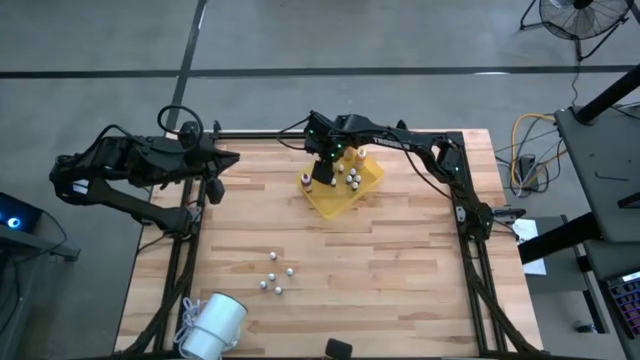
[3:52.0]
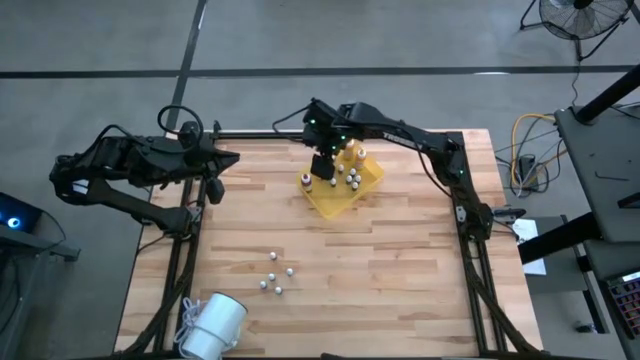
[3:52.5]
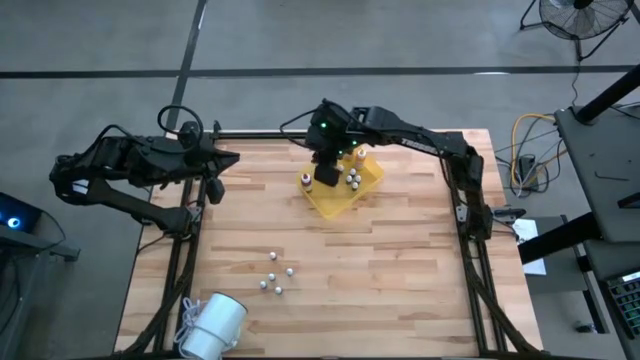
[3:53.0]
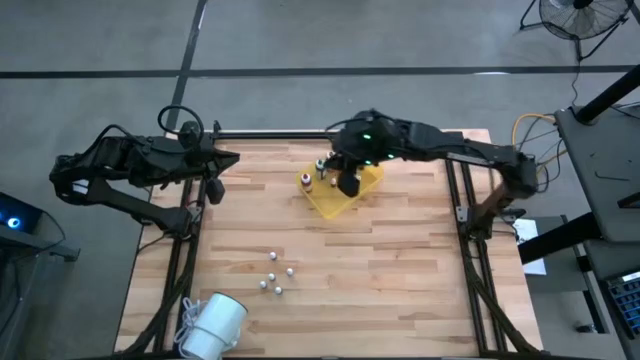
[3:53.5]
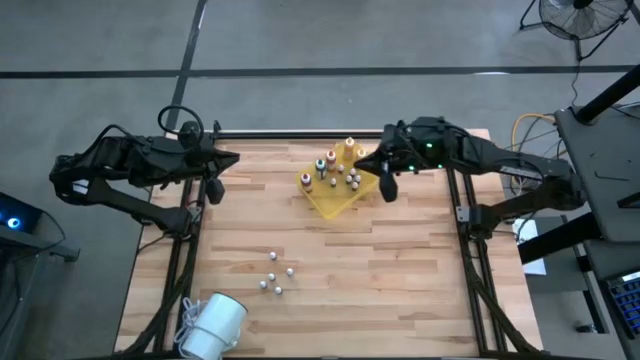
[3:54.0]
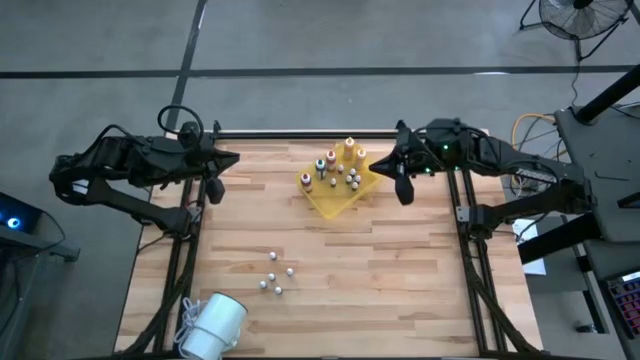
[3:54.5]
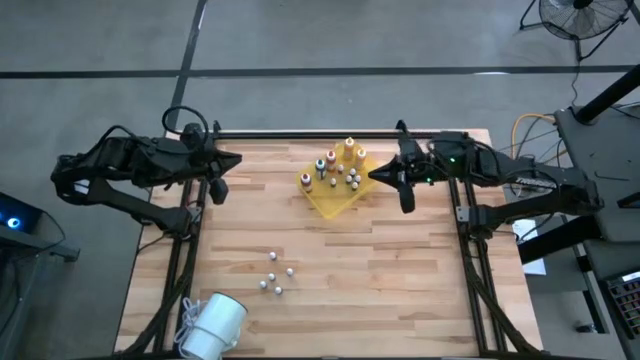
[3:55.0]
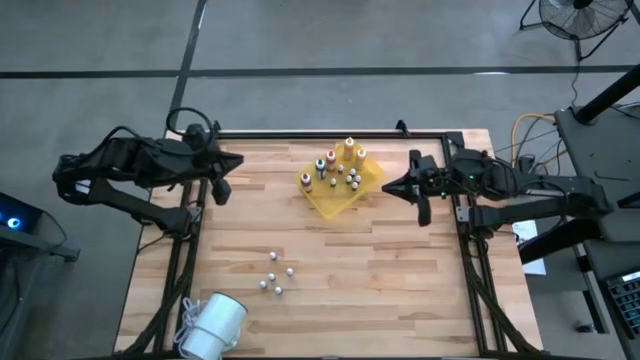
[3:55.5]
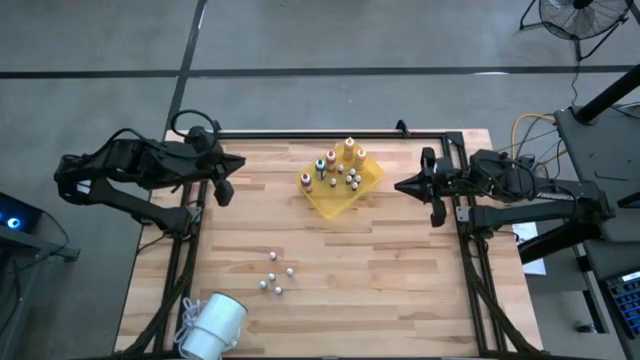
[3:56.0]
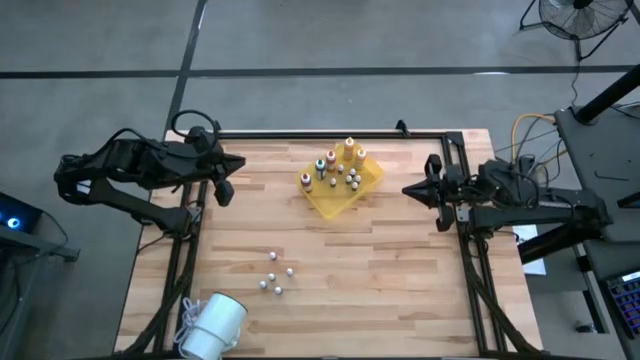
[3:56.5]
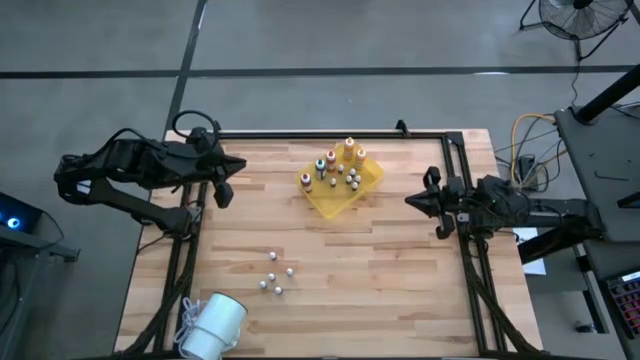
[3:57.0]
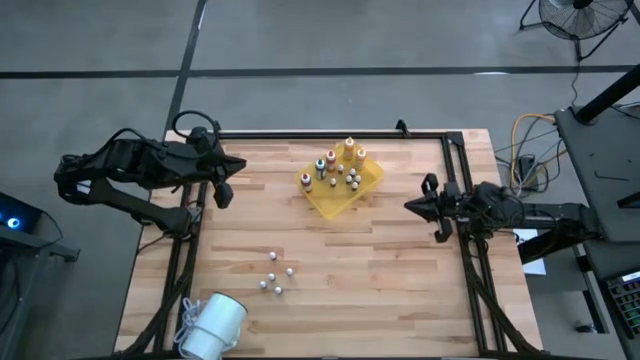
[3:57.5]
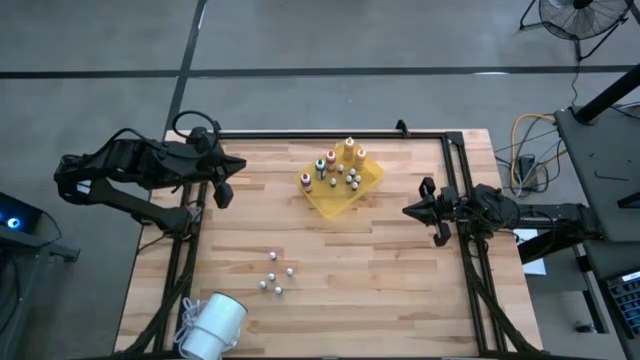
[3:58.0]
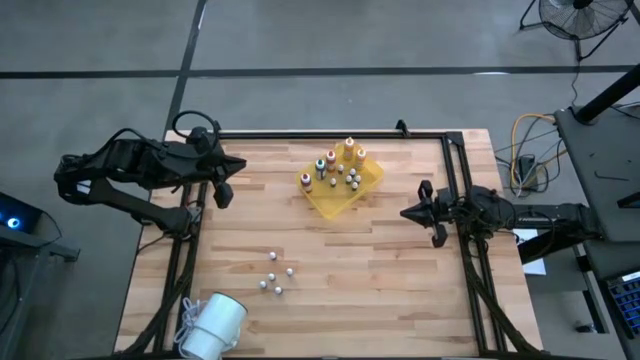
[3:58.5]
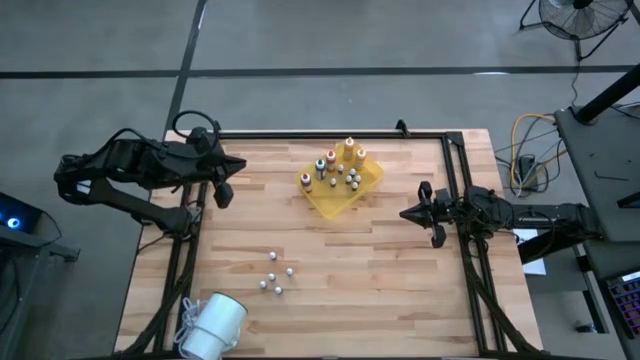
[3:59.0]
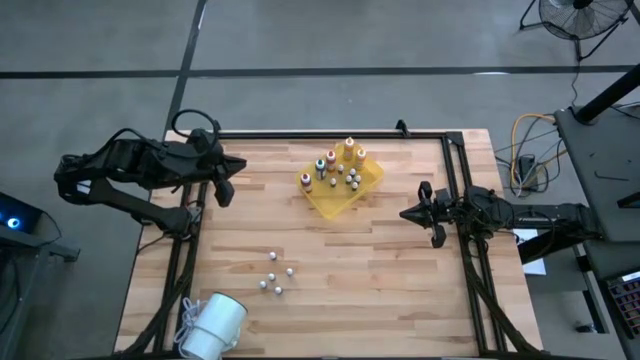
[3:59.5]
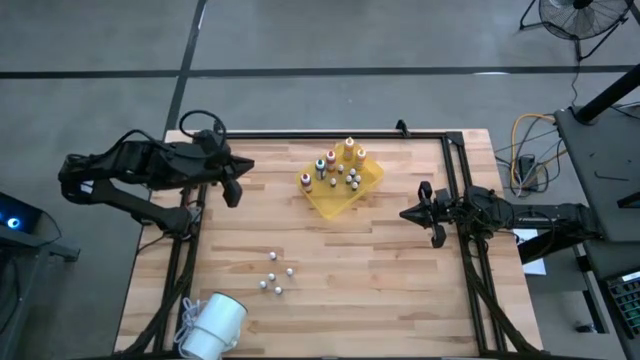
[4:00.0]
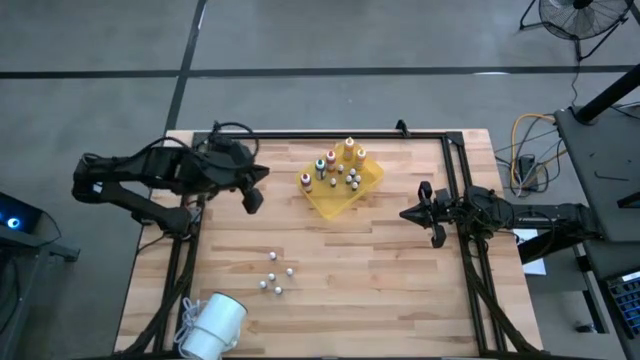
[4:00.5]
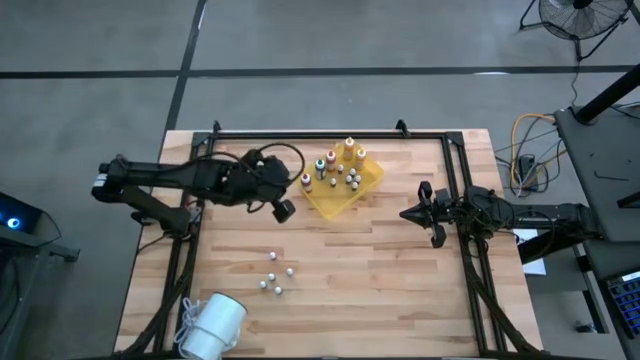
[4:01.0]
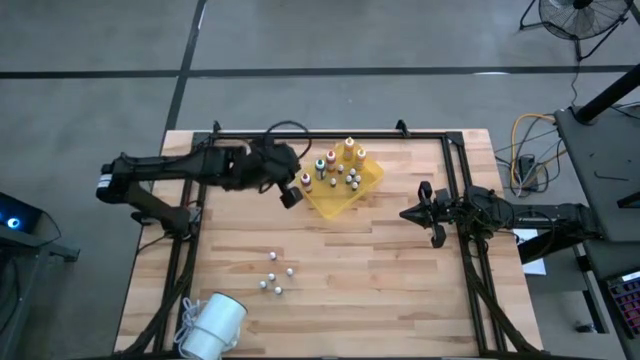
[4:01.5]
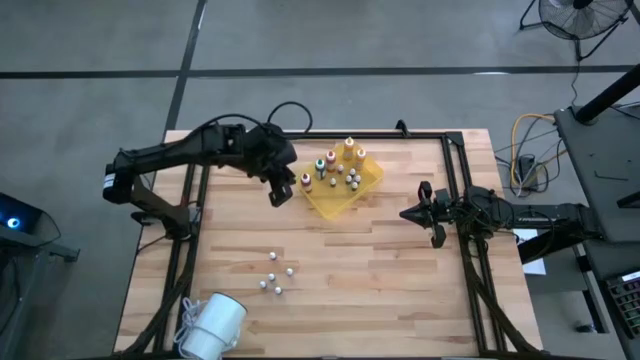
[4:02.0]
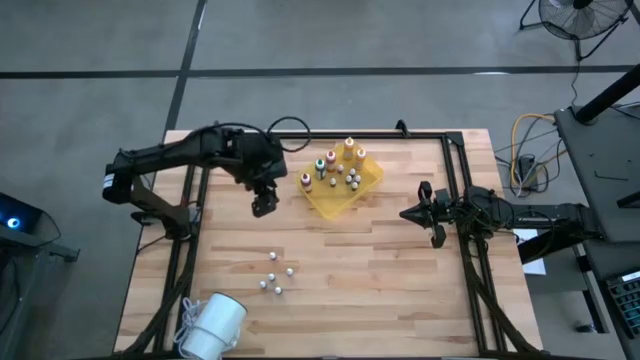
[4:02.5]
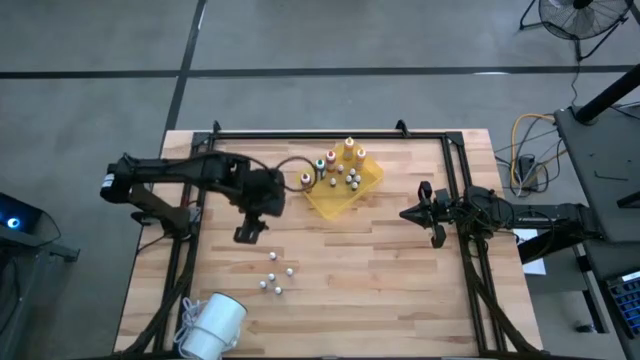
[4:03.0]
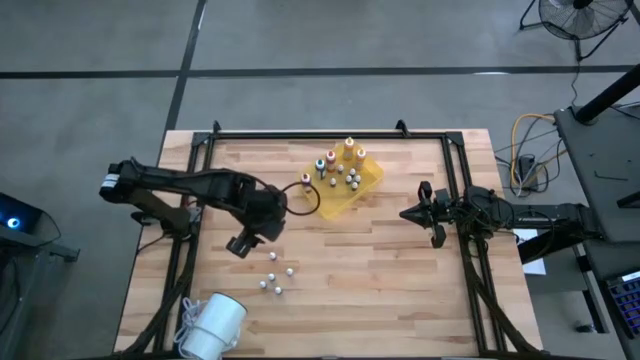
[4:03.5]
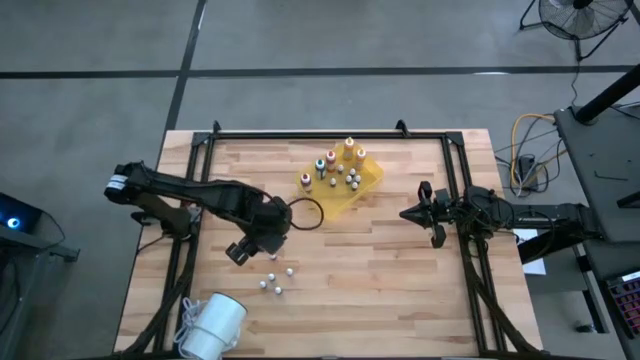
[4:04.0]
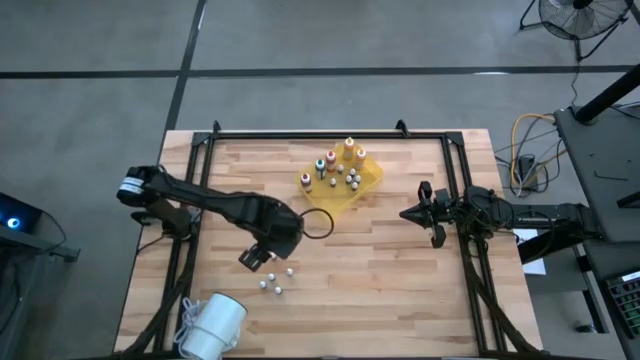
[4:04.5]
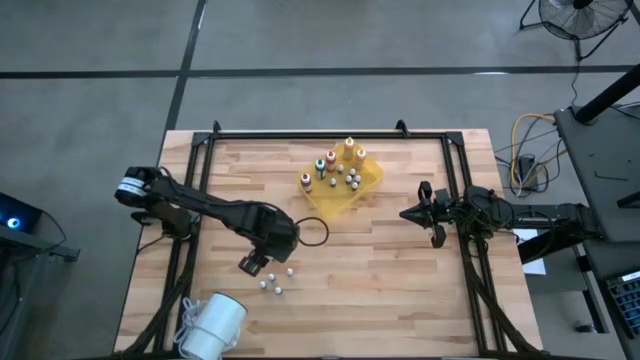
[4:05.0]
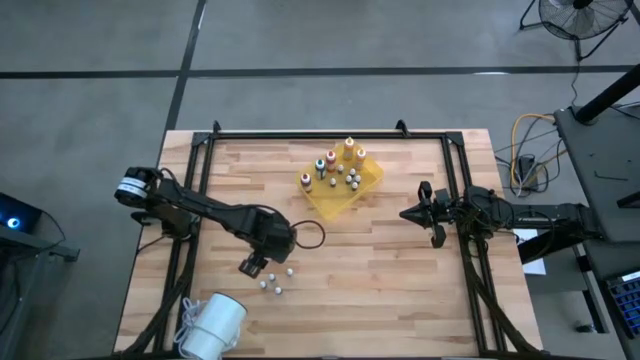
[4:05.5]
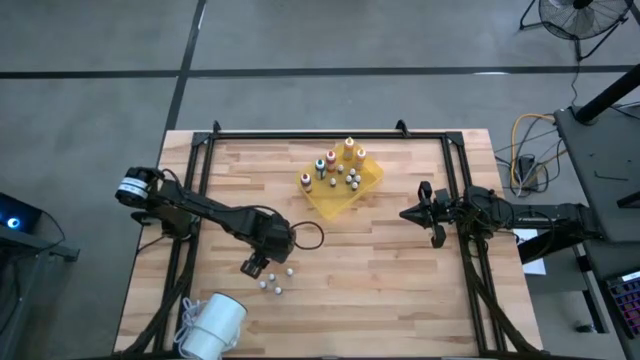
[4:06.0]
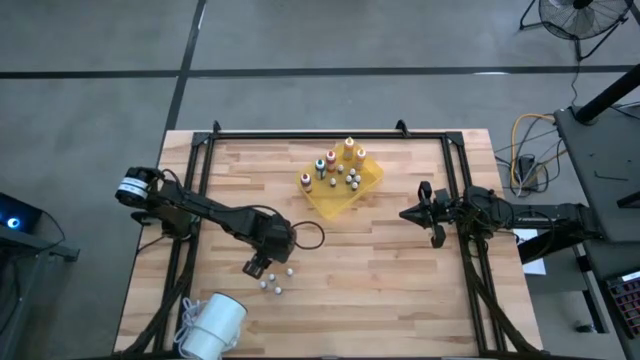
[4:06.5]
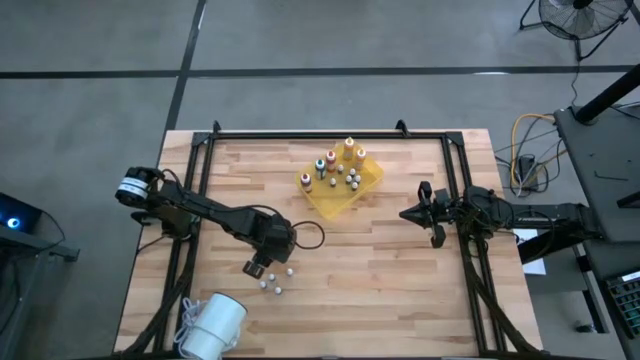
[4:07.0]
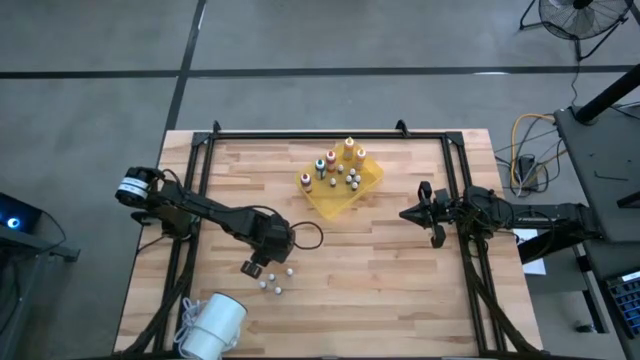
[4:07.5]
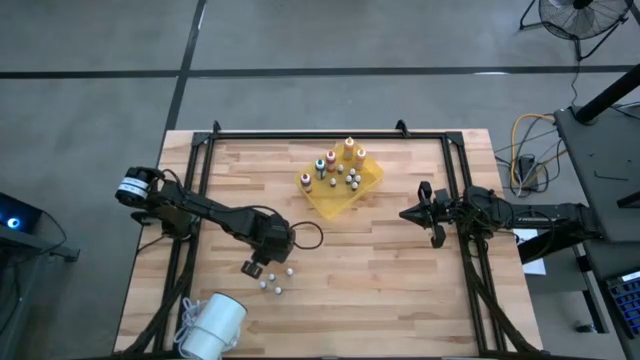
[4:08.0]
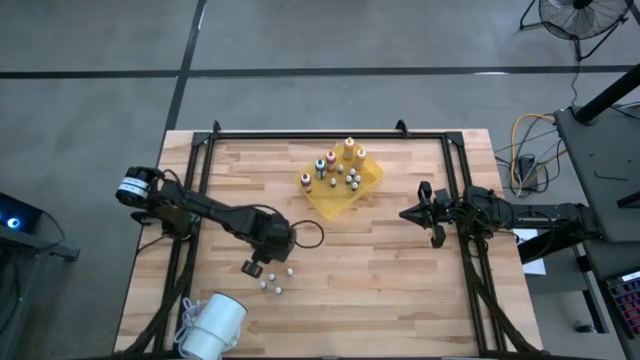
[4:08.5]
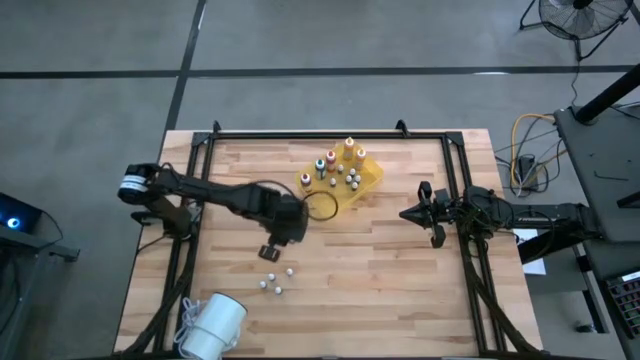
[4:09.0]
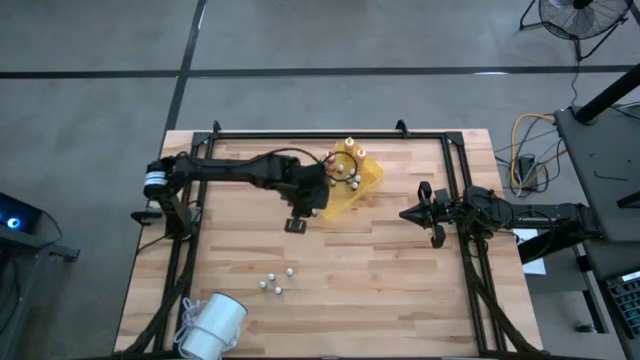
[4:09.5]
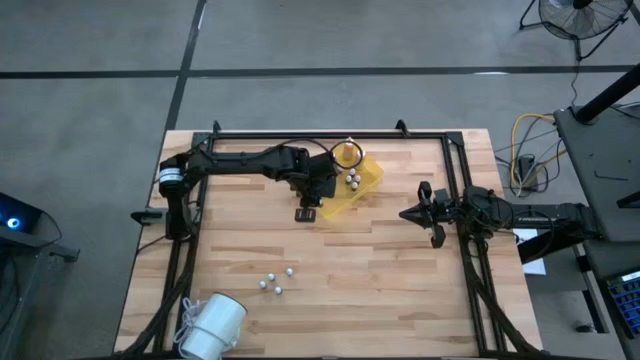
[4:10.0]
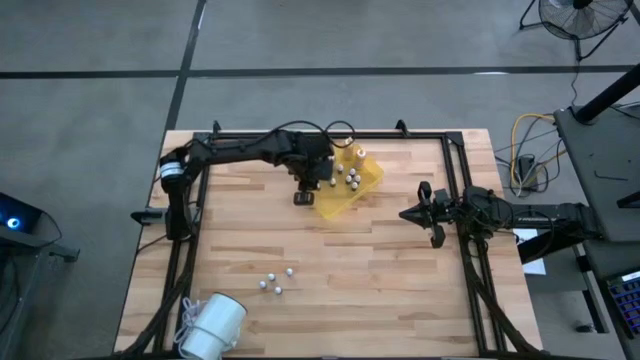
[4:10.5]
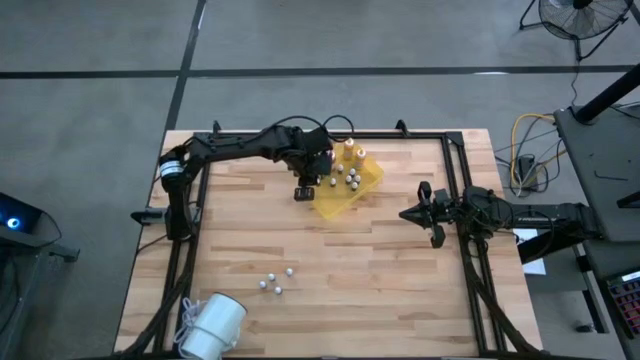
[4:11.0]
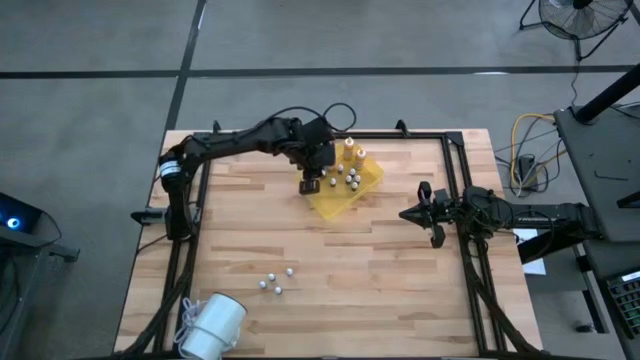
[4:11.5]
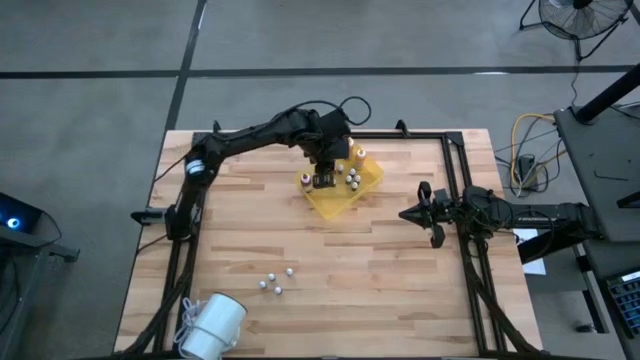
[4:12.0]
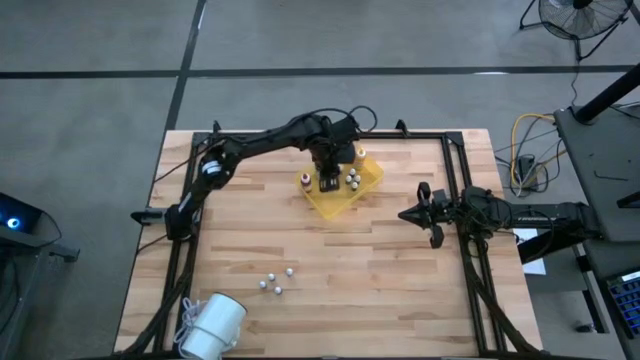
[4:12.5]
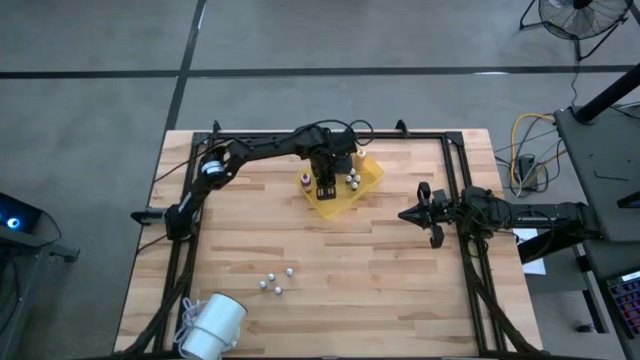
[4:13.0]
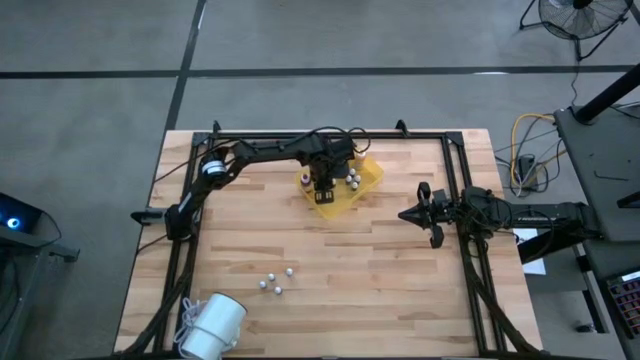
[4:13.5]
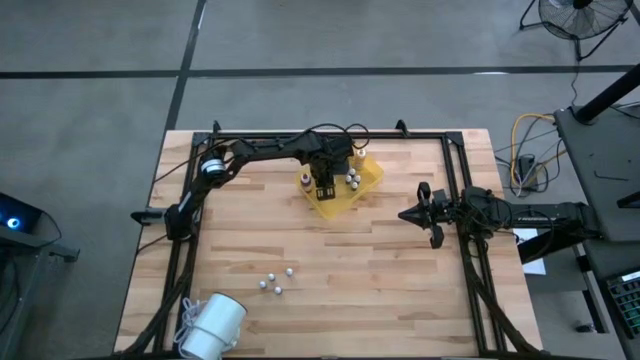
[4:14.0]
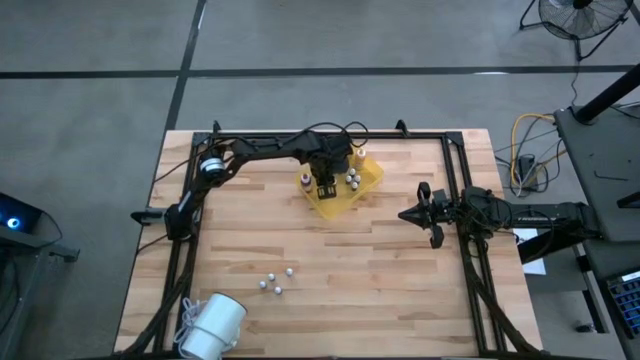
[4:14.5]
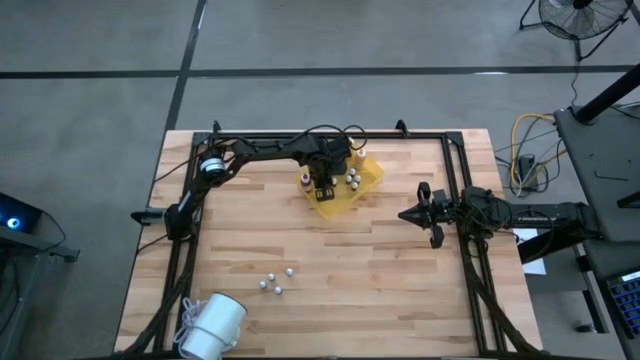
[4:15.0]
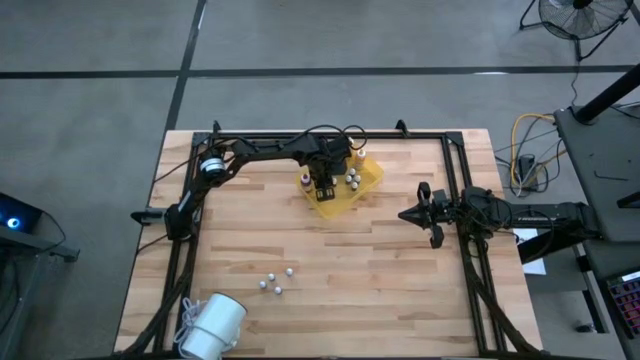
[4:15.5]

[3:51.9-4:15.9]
Task: Pick & Place food coloring
Put the small orange food coloring bottle into the yellow bin
